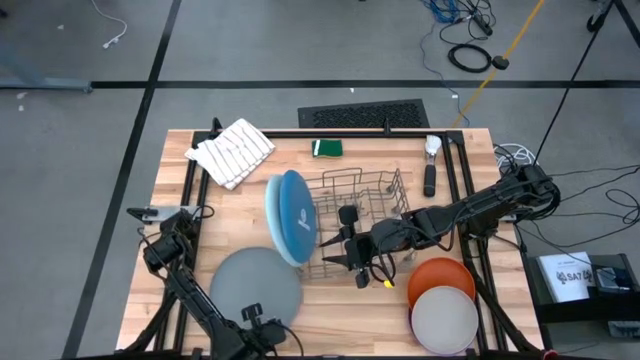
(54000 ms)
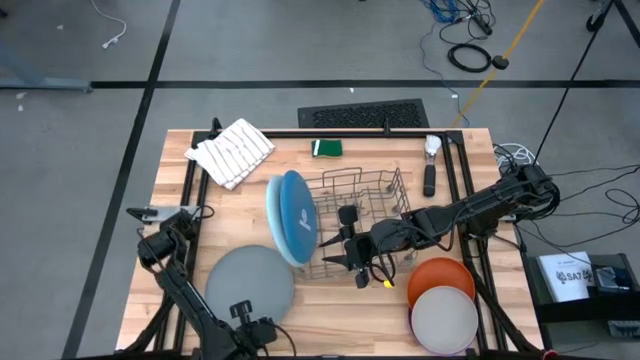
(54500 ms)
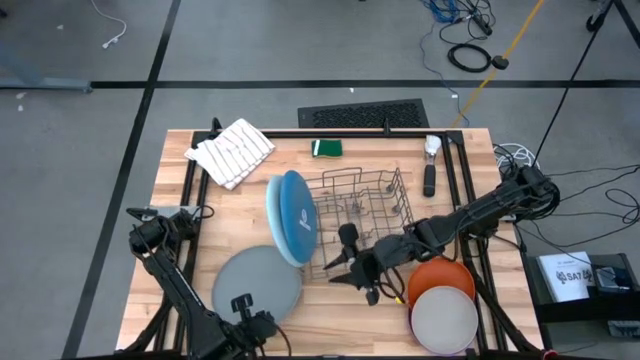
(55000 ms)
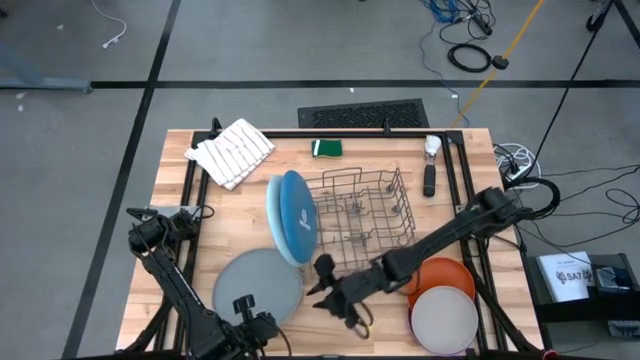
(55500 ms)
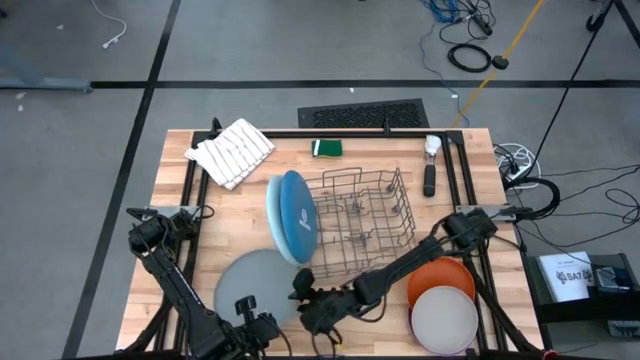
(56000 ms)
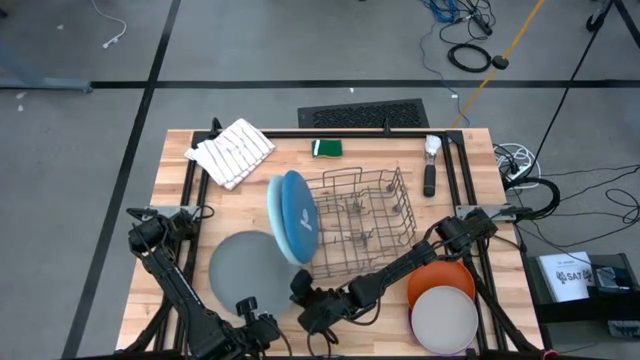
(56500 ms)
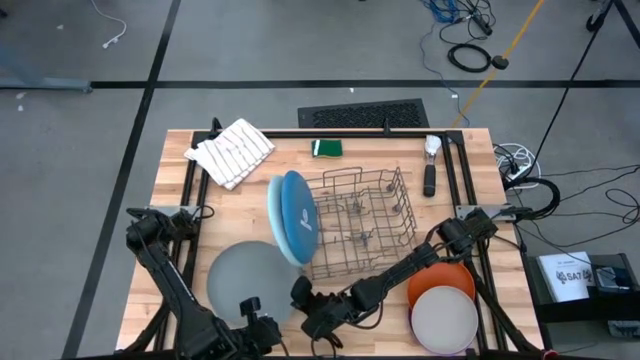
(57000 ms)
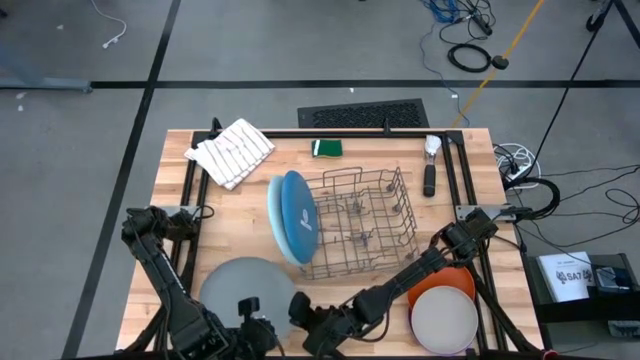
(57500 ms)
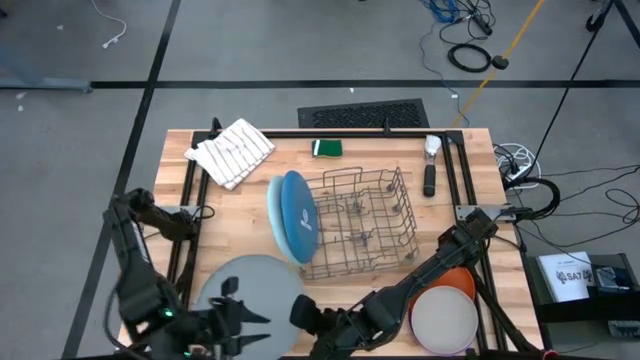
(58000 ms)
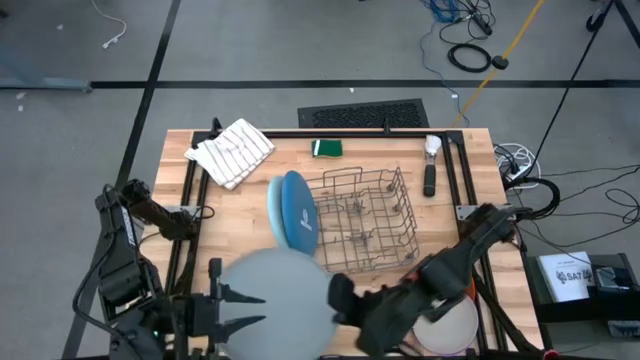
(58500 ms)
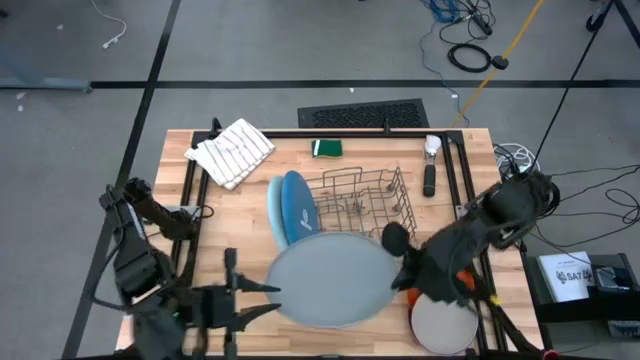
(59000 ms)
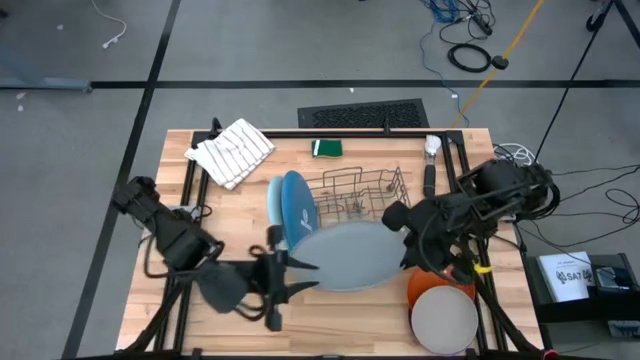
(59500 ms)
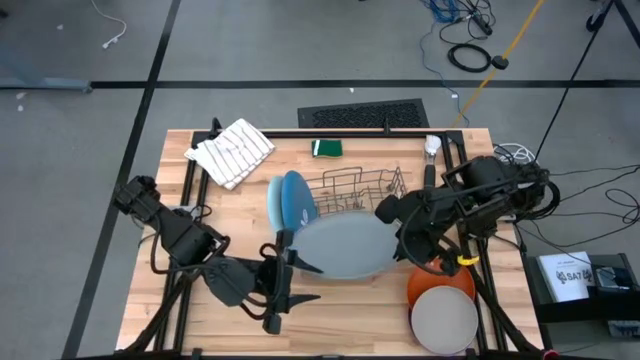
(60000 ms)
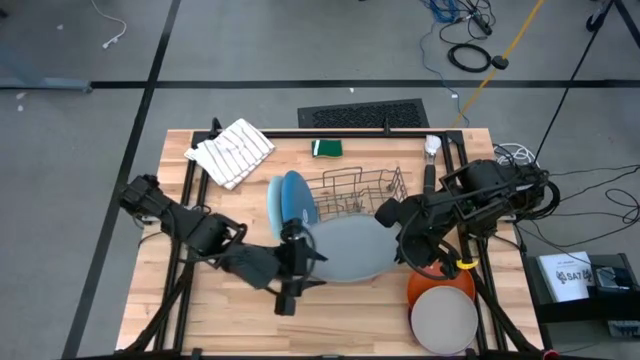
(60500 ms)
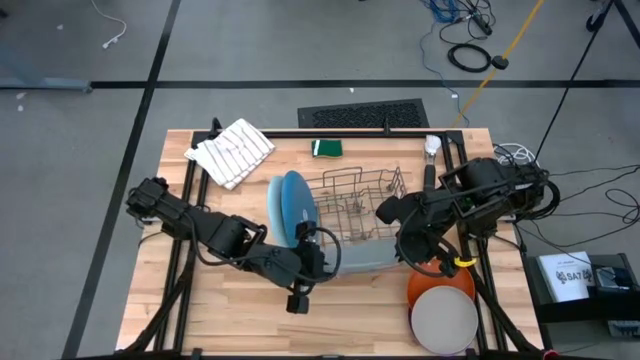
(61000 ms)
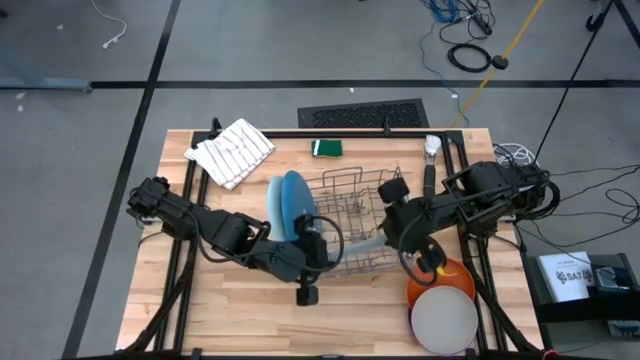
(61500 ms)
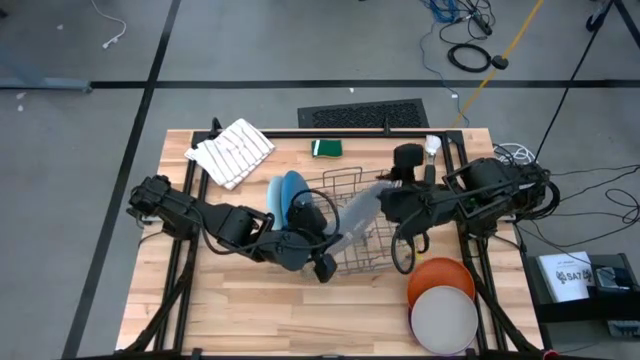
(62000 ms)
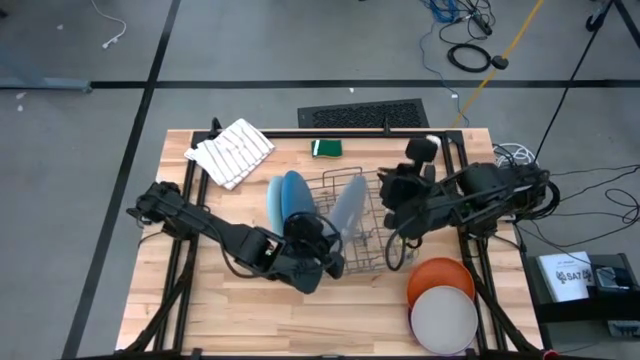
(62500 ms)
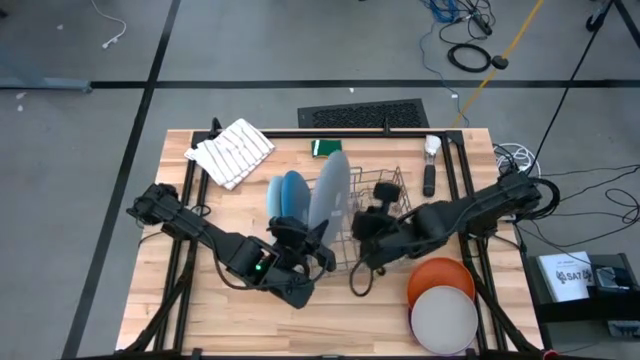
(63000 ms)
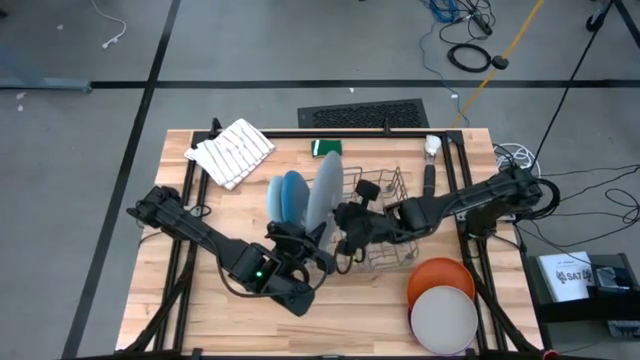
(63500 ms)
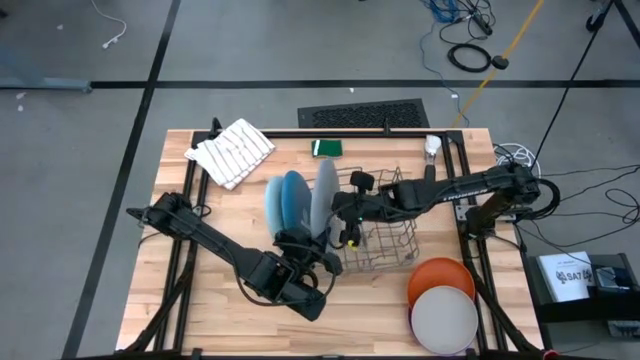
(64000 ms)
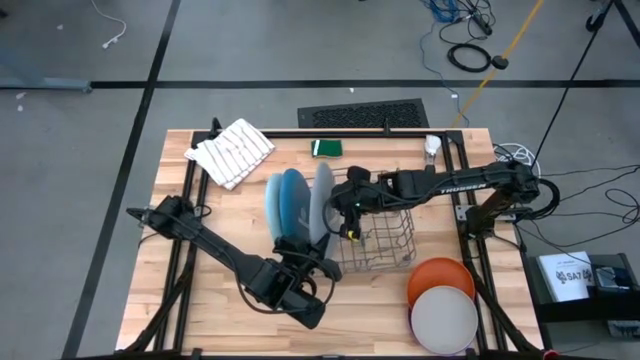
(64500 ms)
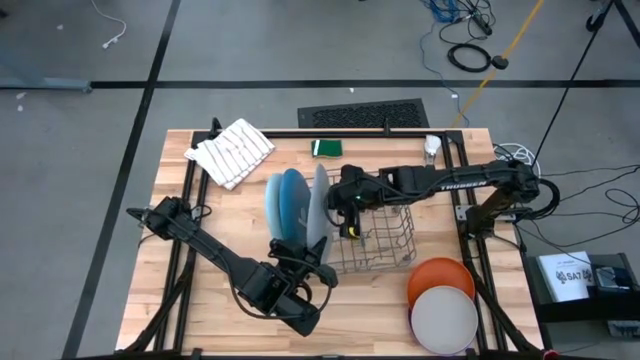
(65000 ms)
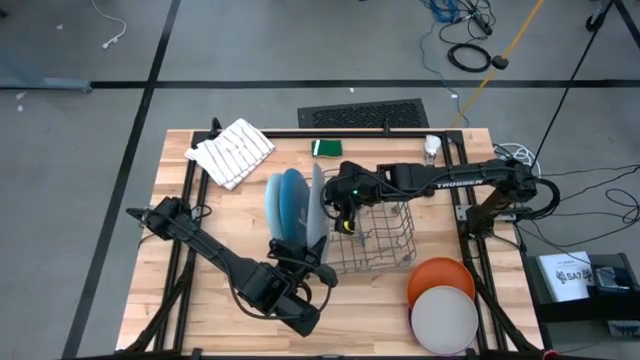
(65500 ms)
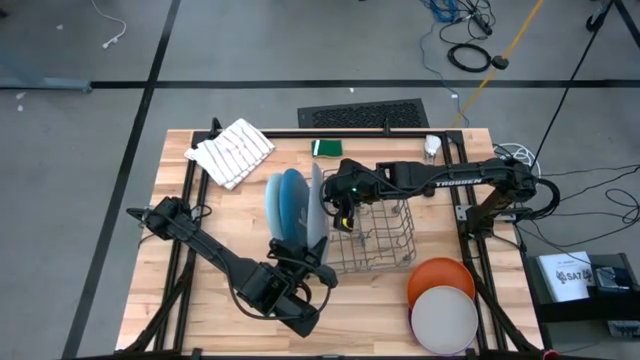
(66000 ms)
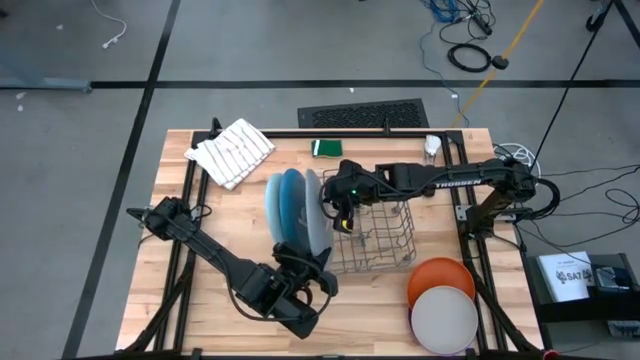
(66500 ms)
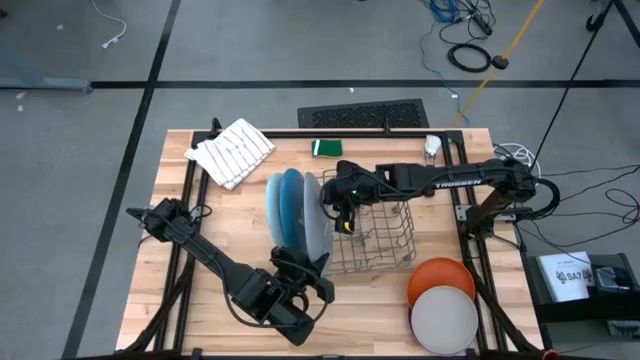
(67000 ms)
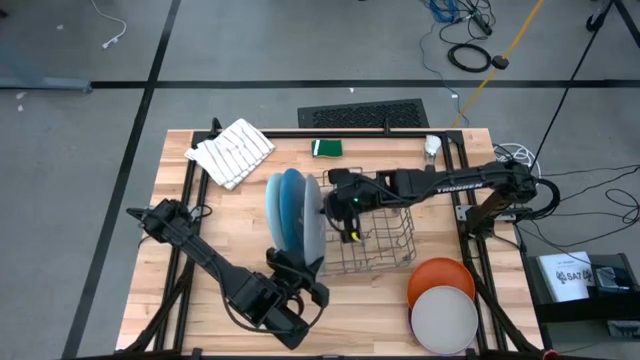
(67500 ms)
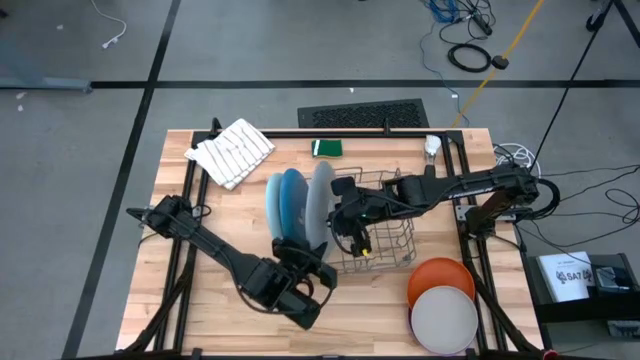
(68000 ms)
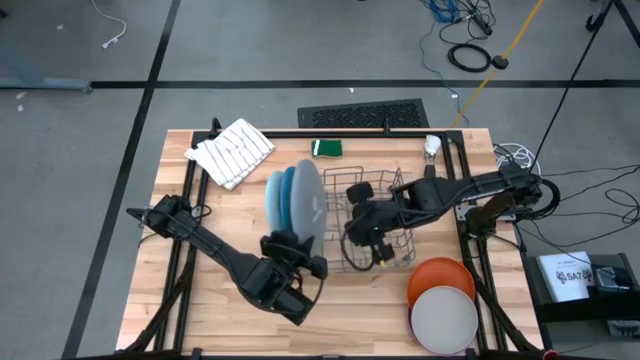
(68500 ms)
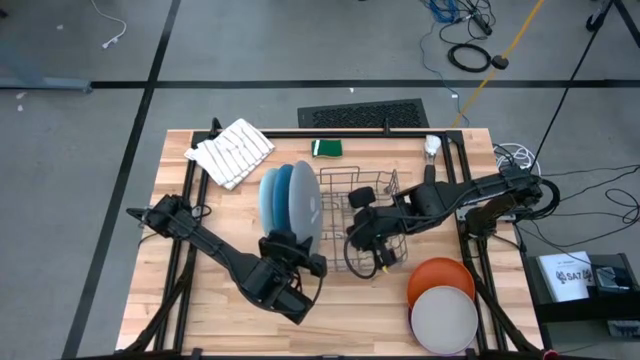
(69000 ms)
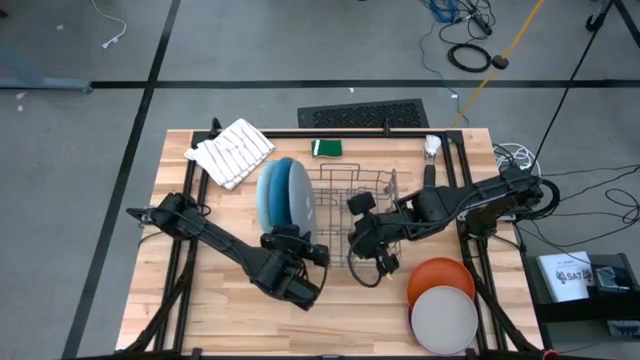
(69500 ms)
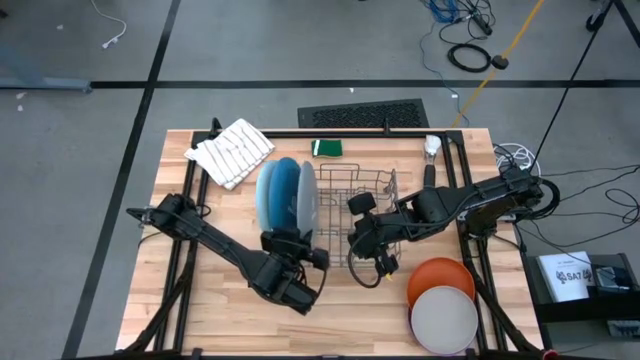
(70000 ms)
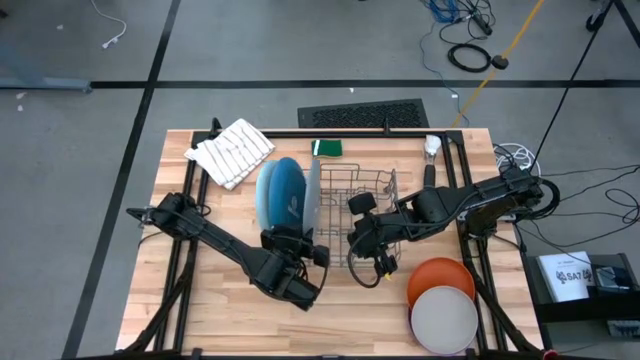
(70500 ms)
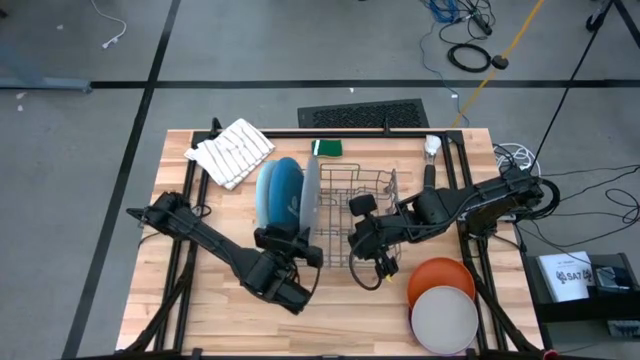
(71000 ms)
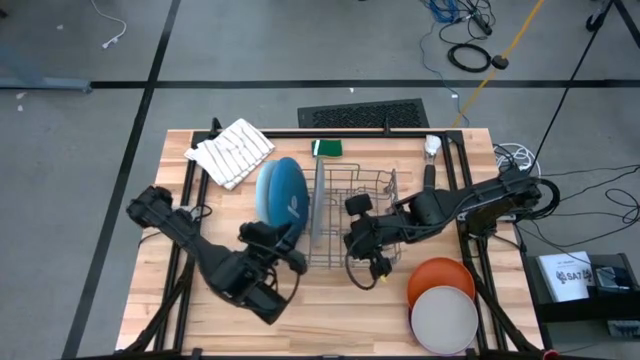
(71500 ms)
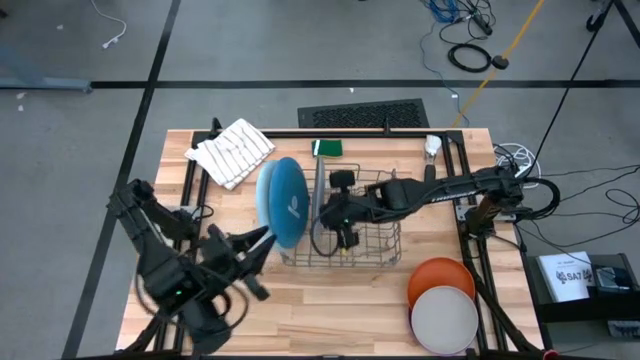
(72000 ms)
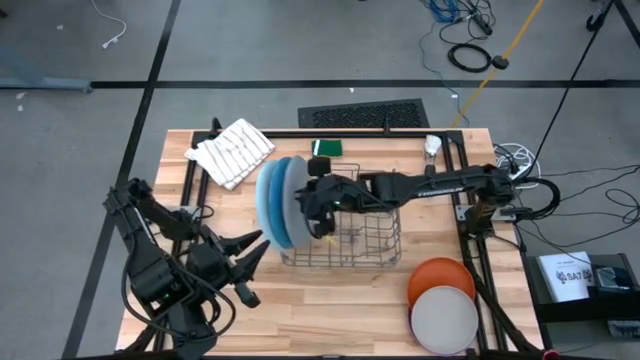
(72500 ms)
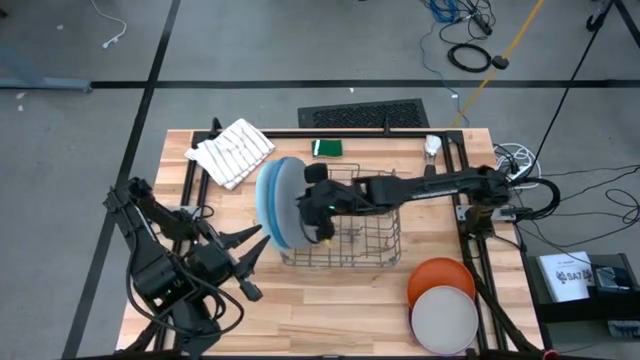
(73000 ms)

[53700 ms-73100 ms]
Task: Sort dishes
Put the gray plate into the dish rack

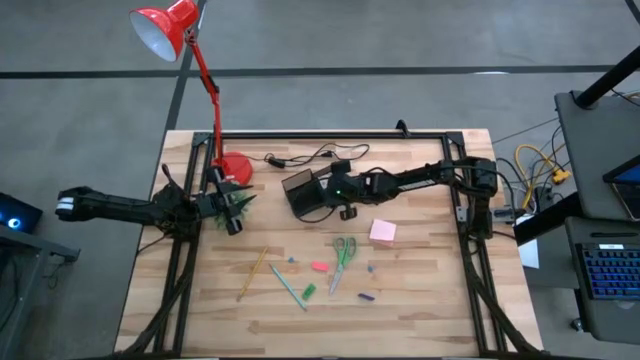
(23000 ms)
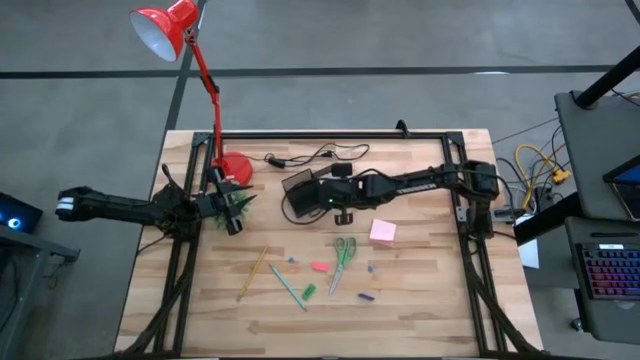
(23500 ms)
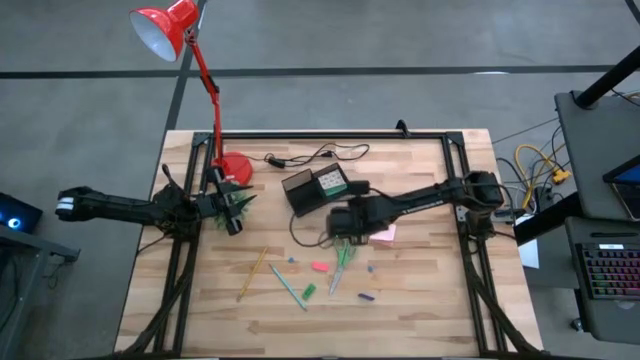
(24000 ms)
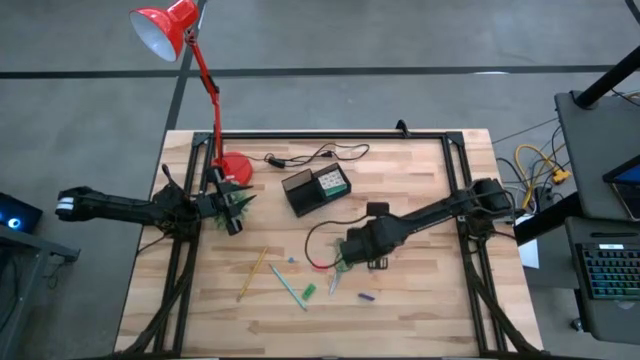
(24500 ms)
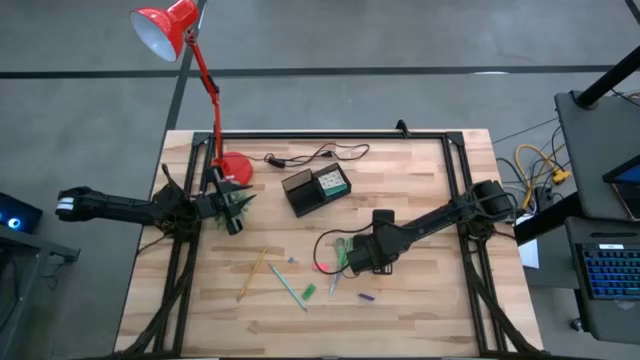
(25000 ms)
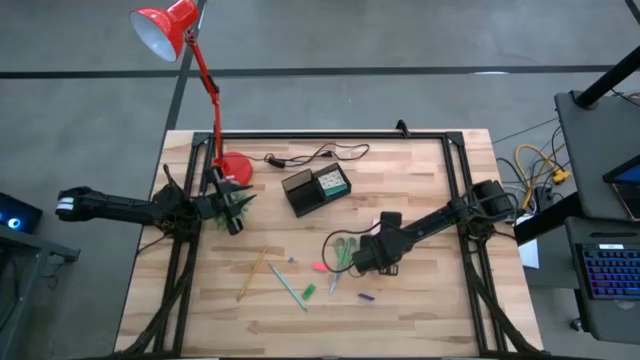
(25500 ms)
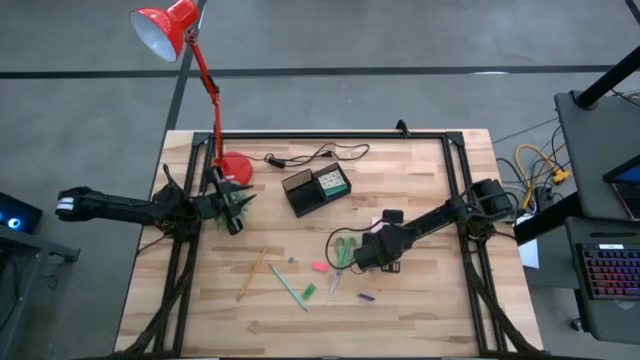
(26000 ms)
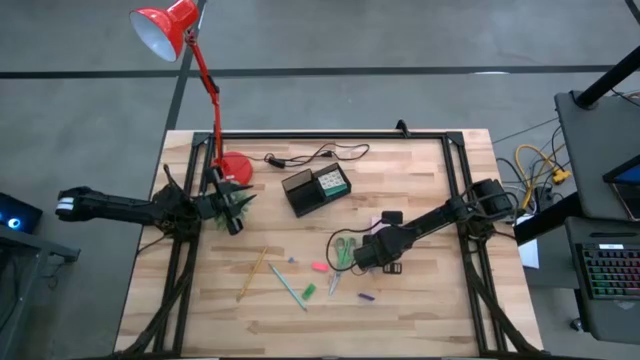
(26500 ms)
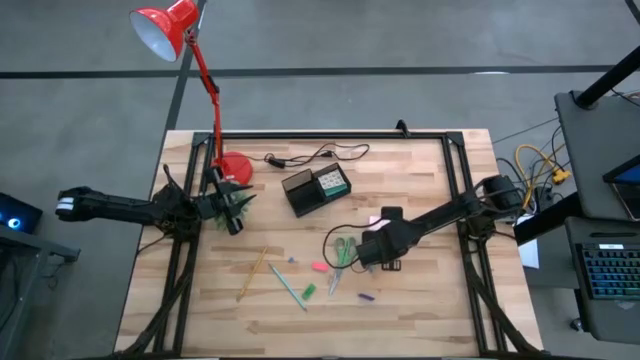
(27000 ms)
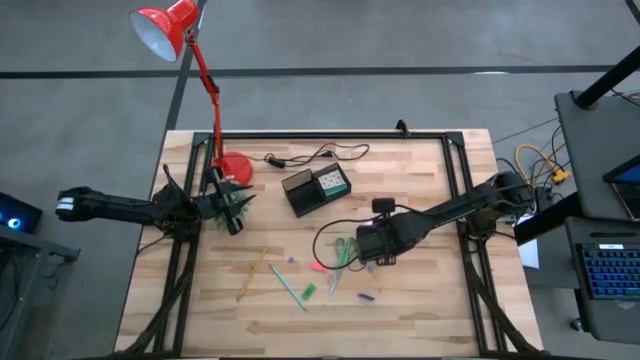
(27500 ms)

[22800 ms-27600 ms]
Task: Pick and place office supplies into organizer
Put the pink sticky note into the black desk organizer
